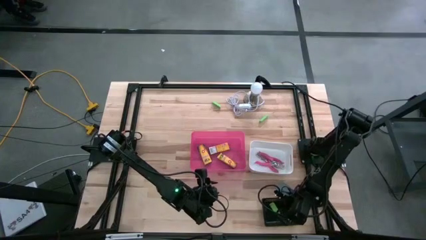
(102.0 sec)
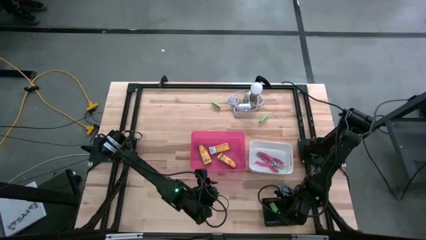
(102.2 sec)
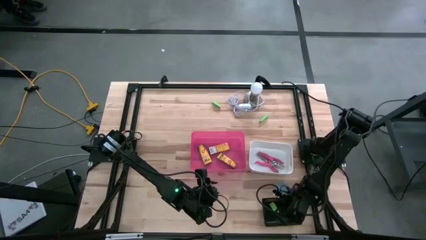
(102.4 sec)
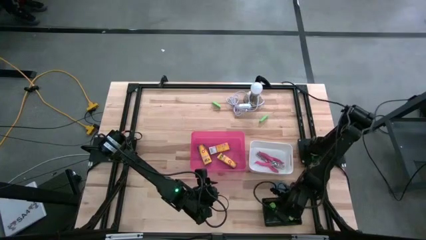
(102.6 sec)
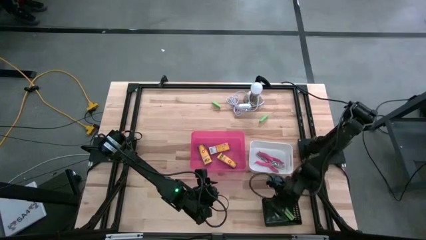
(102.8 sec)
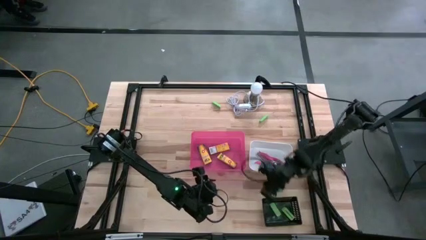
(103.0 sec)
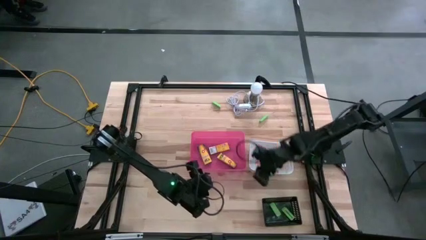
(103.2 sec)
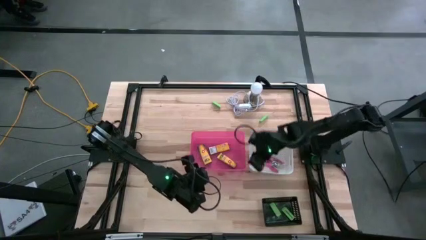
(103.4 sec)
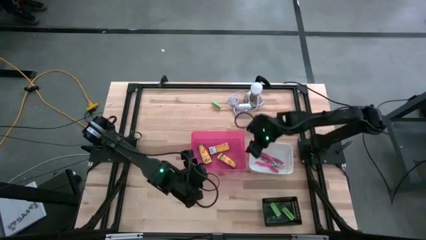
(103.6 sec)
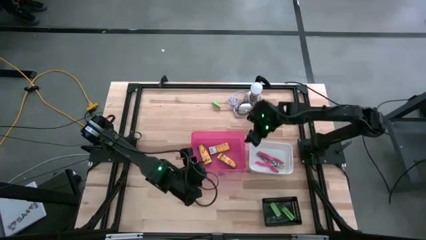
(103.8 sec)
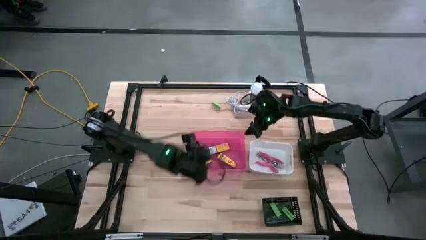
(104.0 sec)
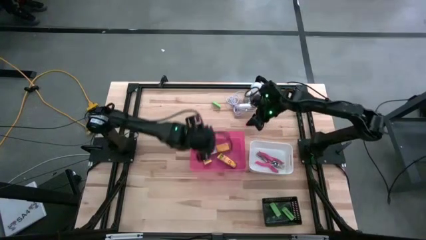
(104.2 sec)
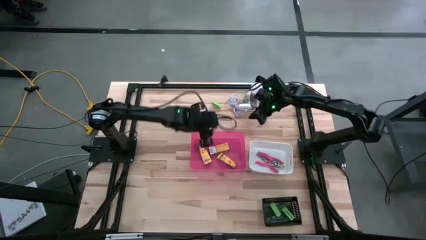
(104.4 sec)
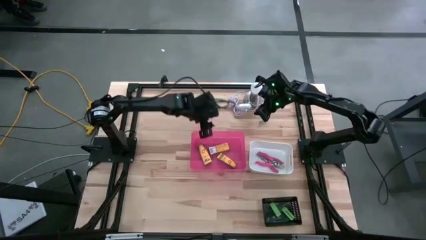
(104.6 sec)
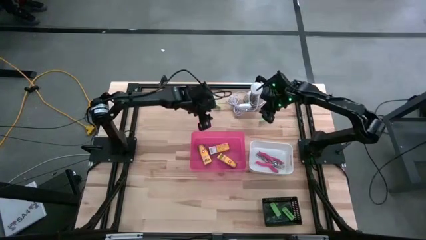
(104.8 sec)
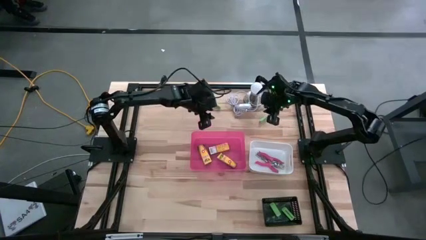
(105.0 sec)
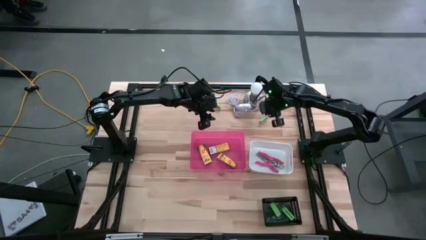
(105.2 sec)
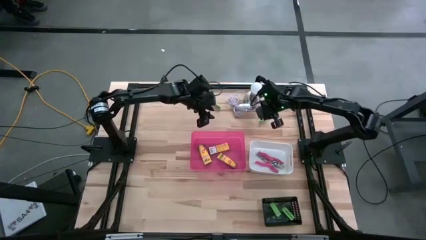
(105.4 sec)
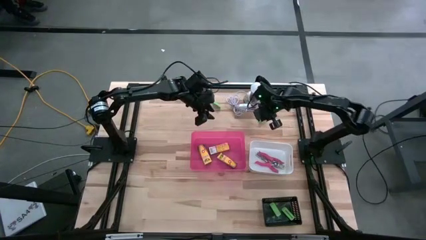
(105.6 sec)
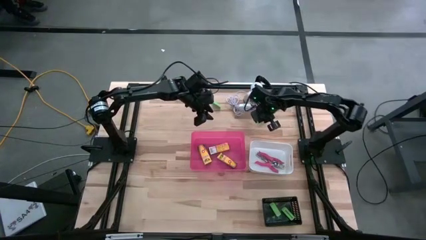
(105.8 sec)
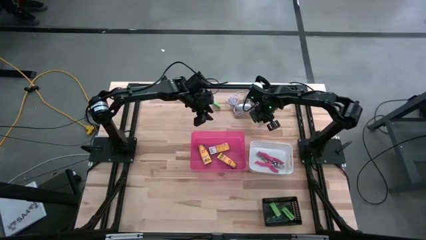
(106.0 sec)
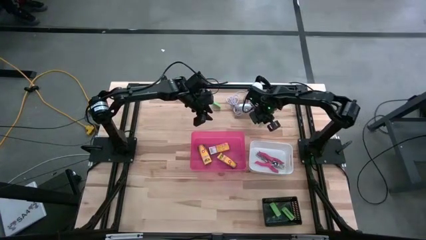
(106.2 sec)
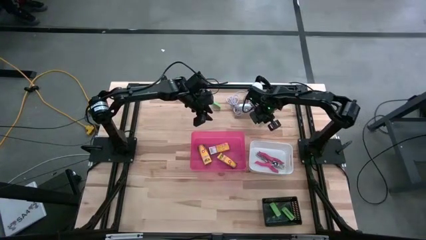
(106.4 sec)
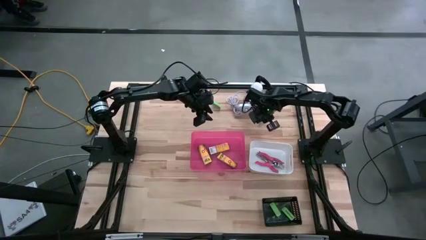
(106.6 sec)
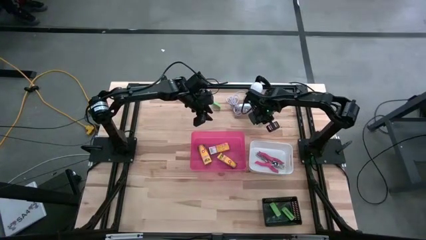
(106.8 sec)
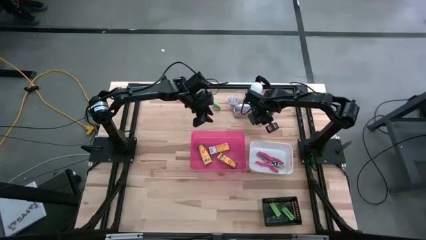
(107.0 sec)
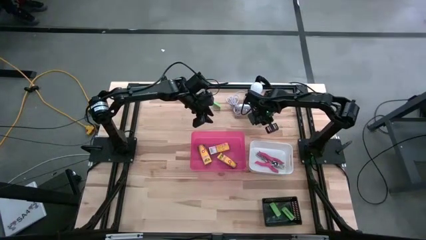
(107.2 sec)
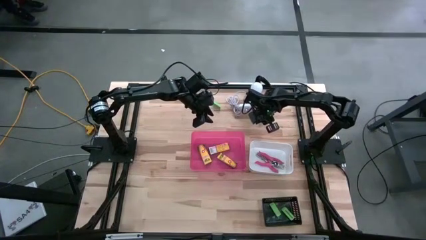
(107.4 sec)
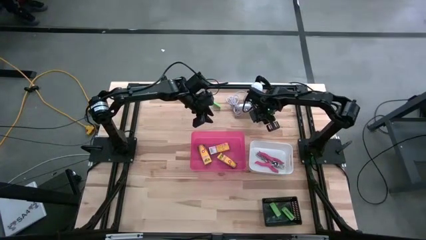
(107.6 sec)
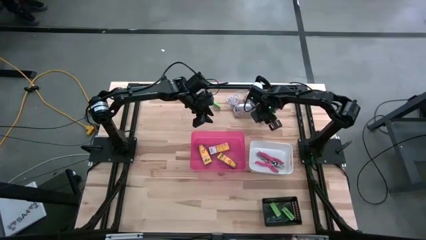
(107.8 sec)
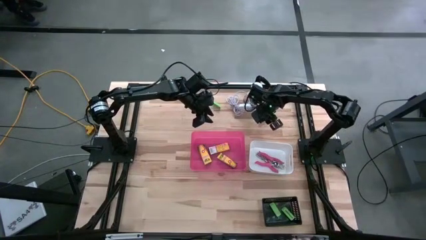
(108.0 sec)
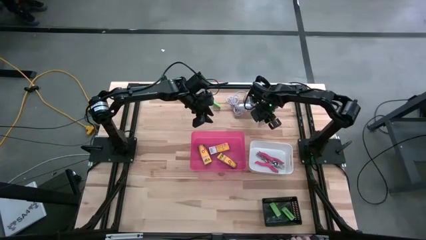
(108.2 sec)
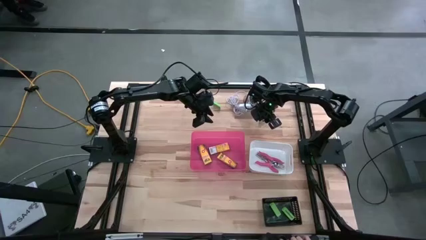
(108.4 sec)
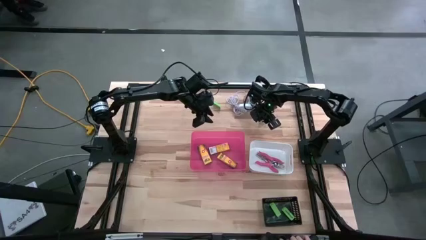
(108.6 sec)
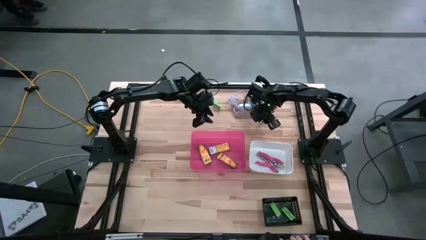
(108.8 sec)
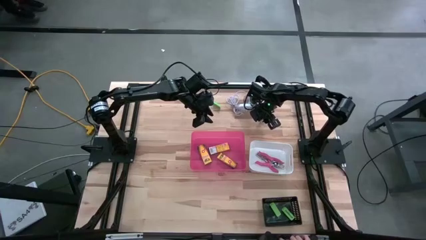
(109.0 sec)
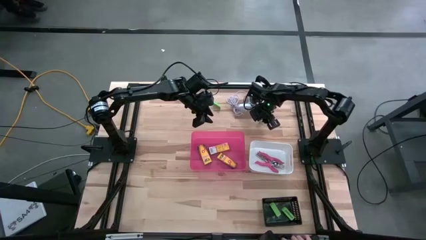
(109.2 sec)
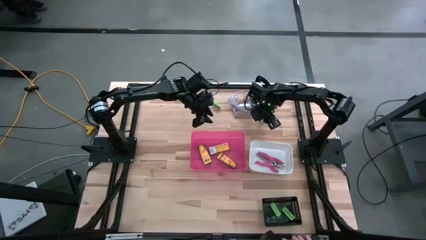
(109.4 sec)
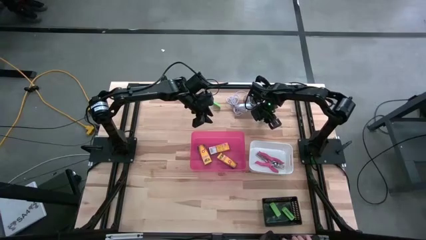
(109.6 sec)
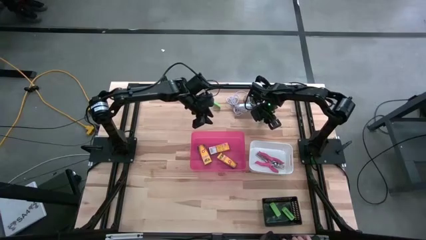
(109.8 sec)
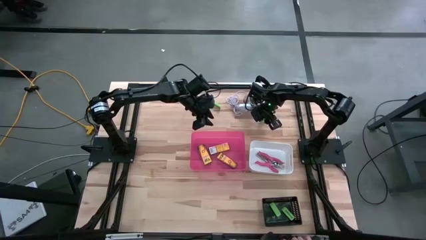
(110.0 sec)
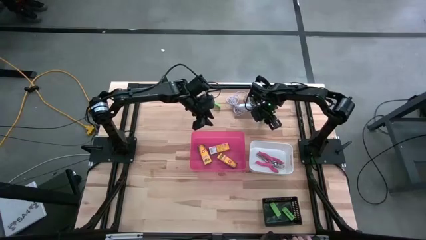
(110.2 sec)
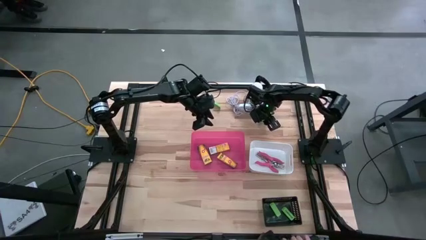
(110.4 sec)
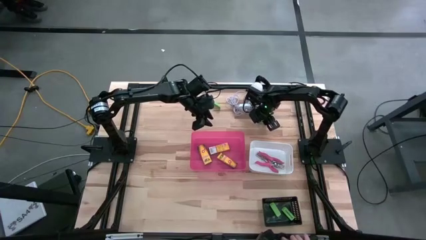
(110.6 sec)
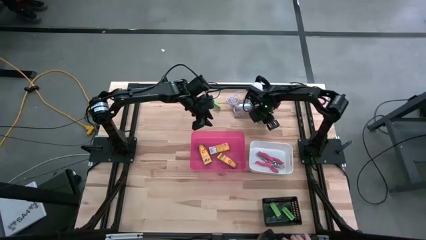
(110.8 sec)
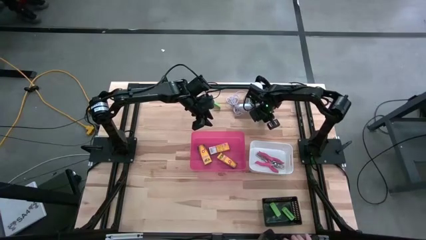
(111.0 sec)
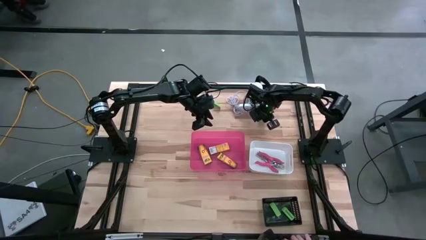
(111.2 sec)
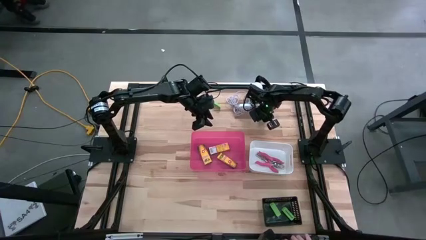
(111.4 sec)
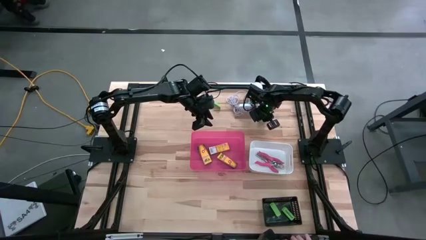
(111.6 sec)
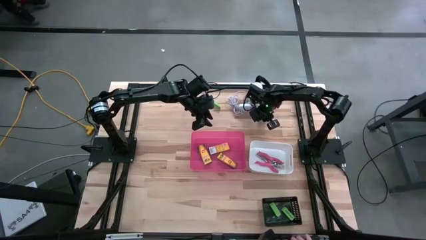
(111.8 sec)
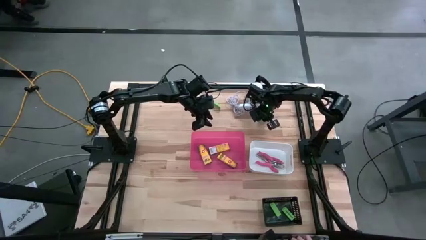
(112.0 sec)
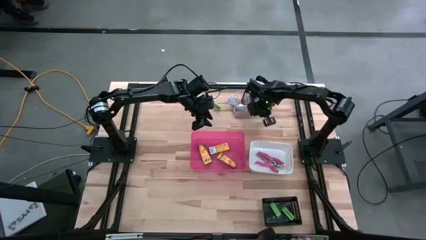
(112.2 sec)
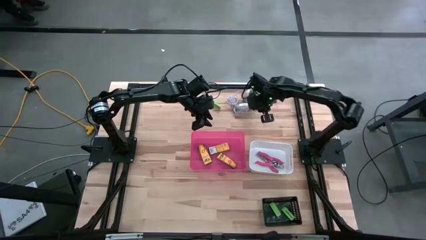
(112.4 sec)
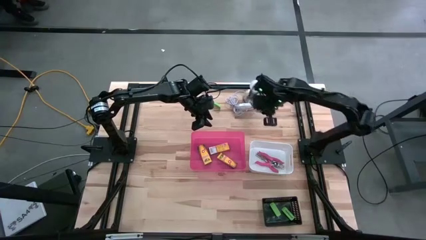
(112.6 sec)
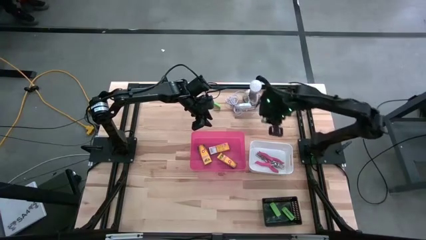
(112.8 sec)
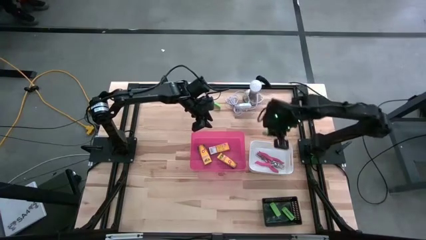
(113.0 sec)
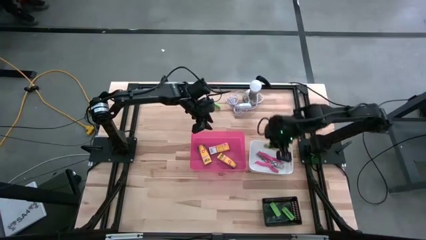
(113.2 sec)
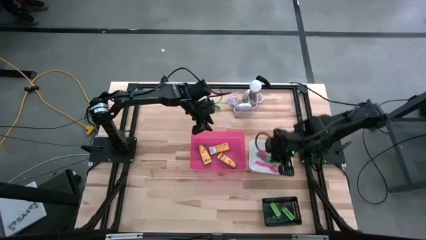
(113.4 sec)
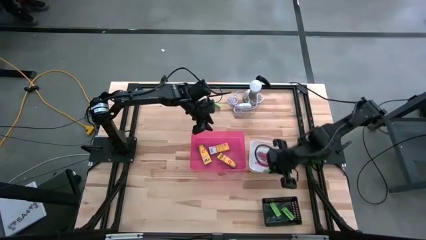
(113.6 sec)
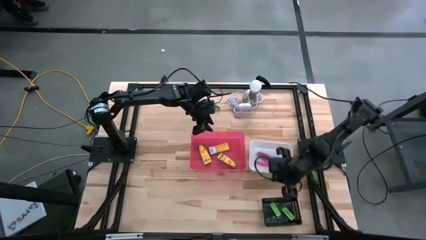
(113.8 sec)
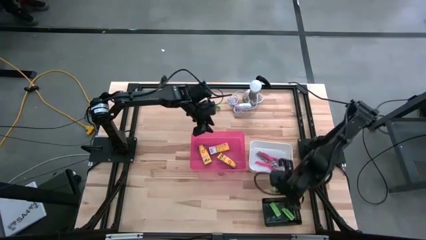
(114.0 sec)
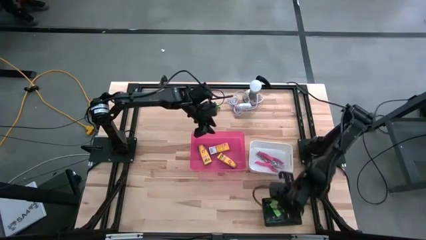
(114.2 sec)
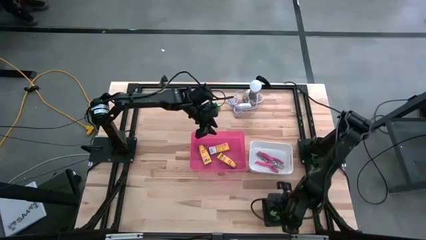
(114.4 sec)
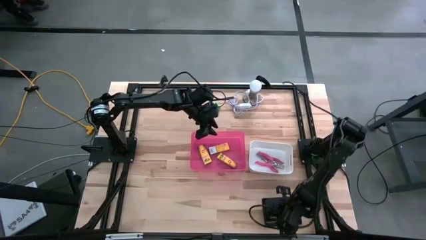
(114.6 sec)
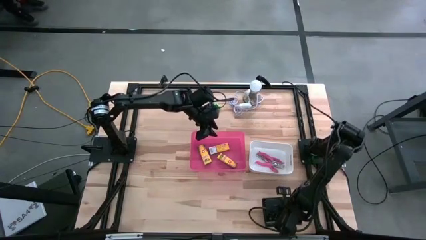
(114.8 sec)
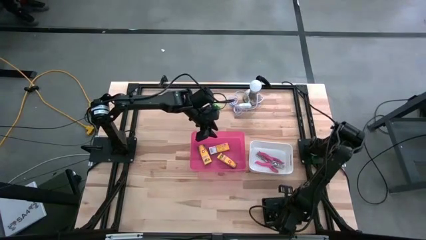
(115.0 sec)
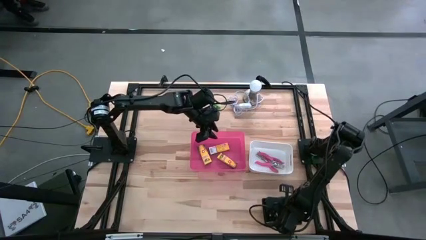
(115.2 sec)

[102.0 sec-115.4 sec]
Task: Pick & Place School Supplies
Put the green eraser into the black bin
